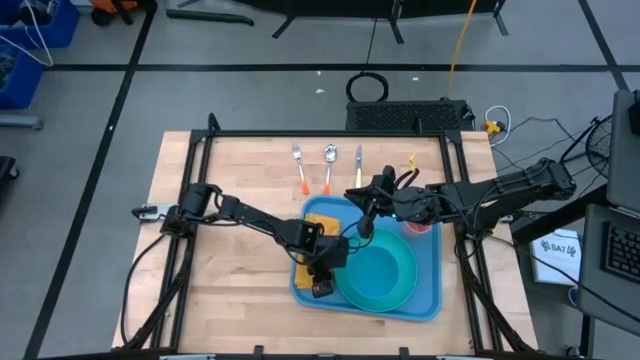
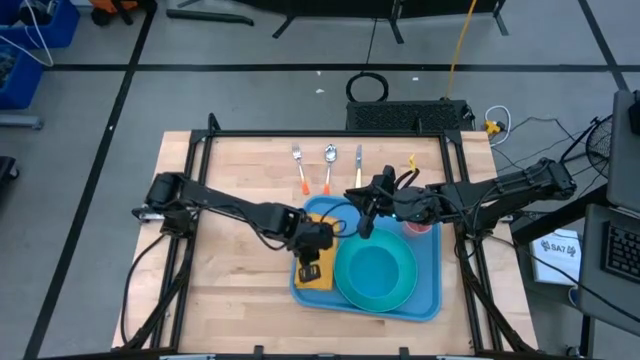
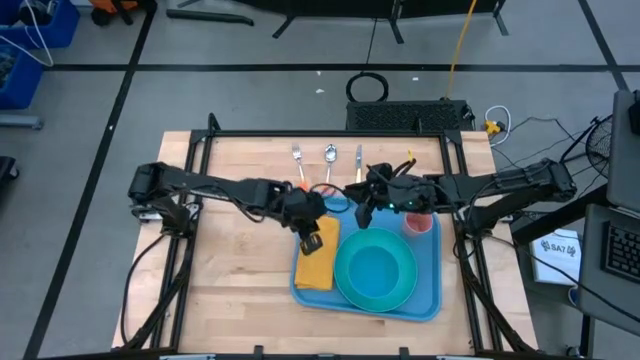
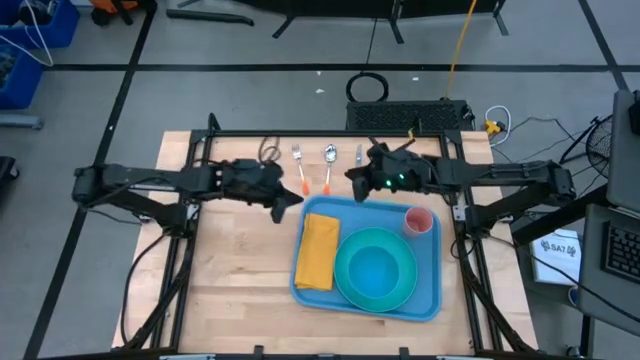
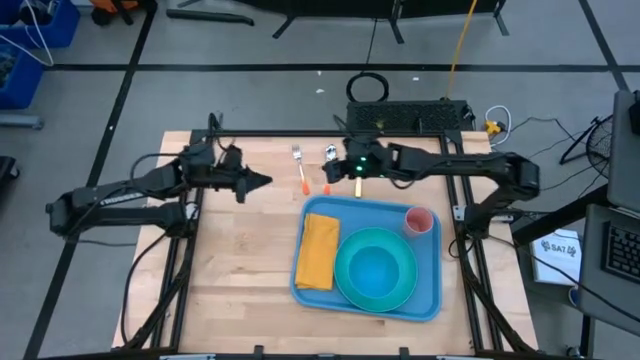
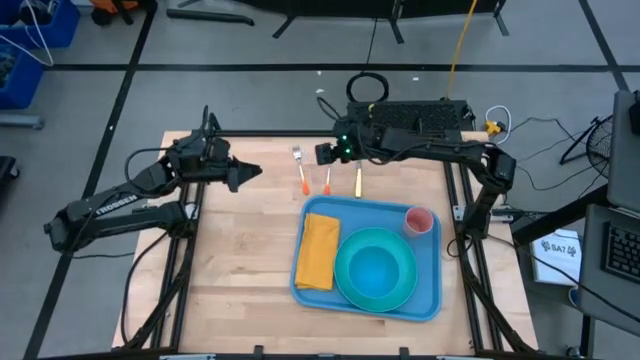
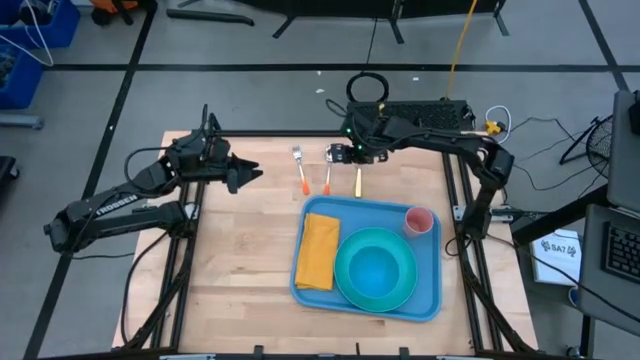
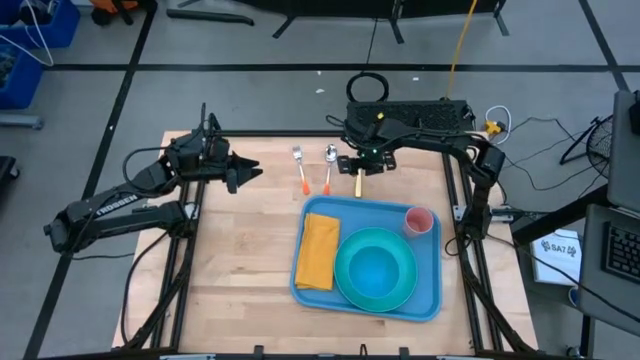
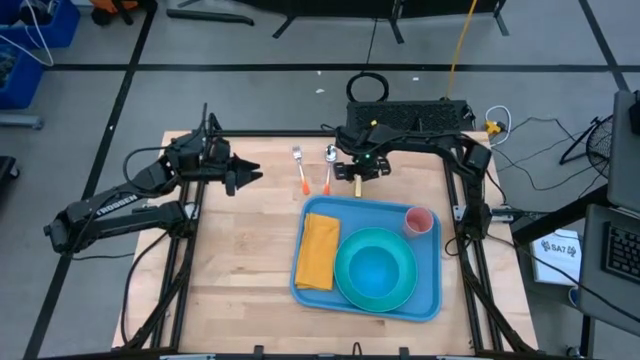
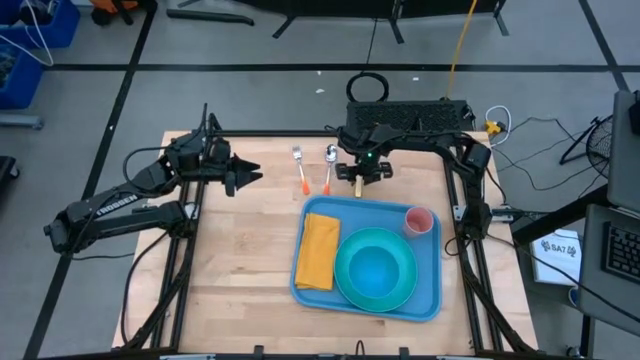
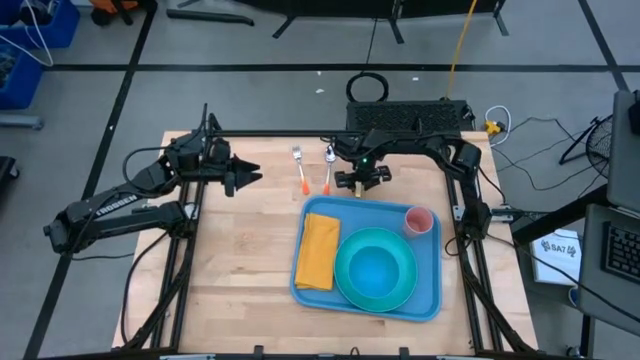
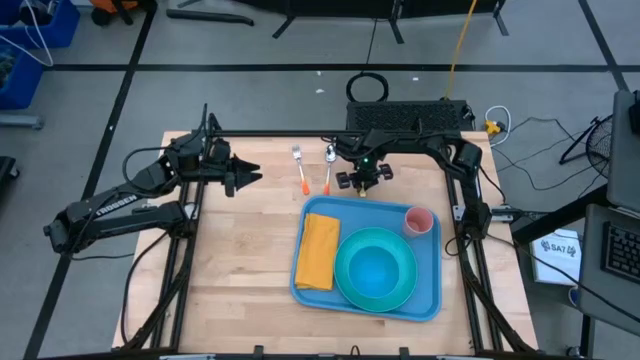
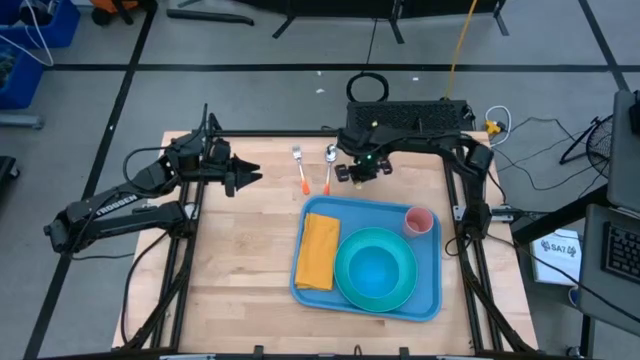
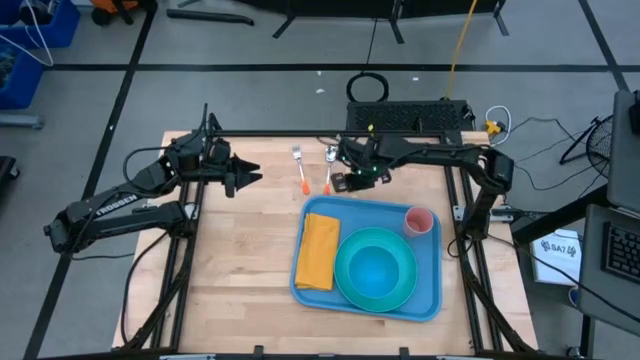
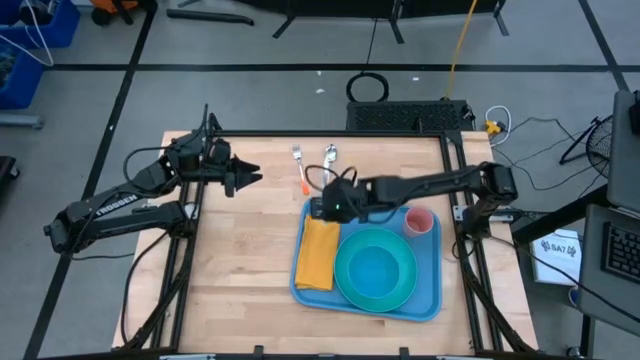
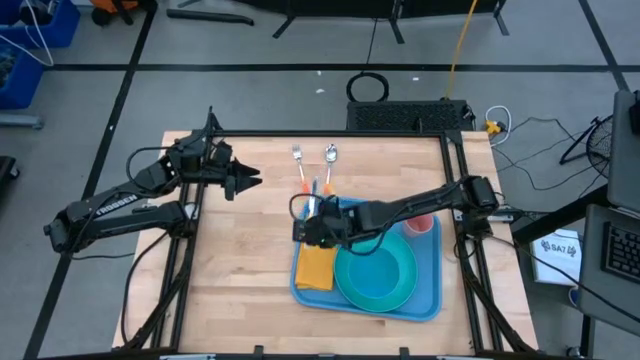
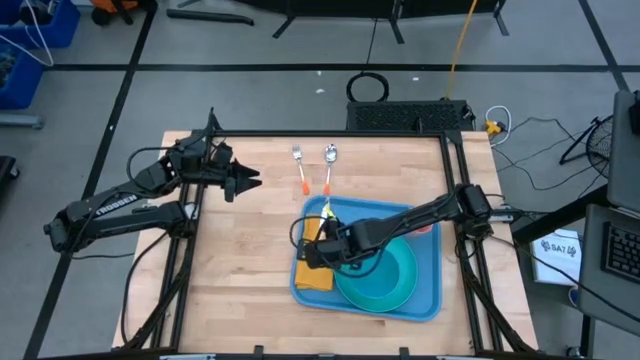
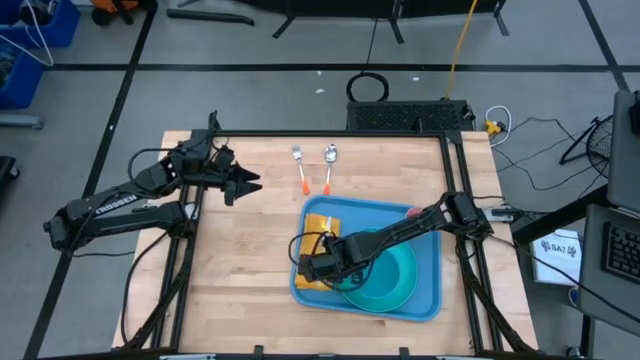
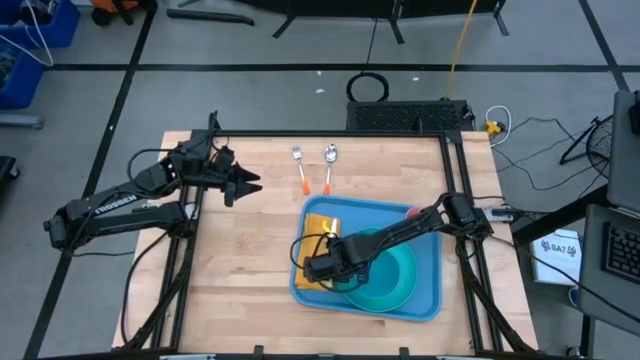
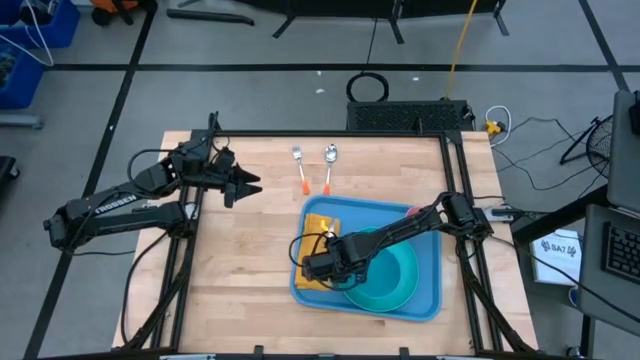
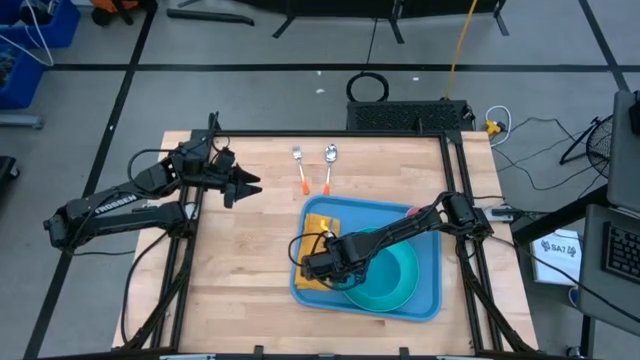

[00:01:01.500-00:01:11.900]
Task: Set up tray
Put the yellow knife on top of the yellow napkin

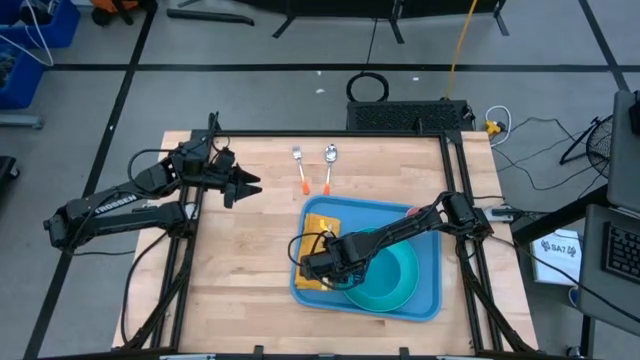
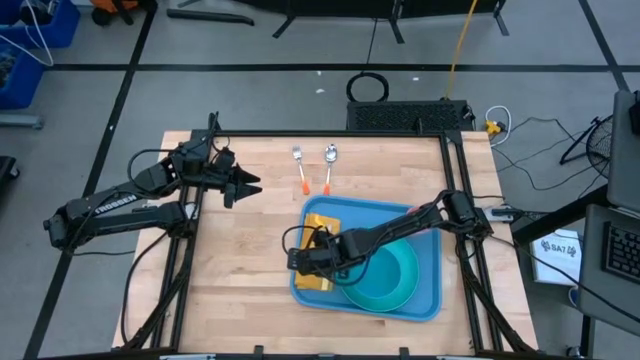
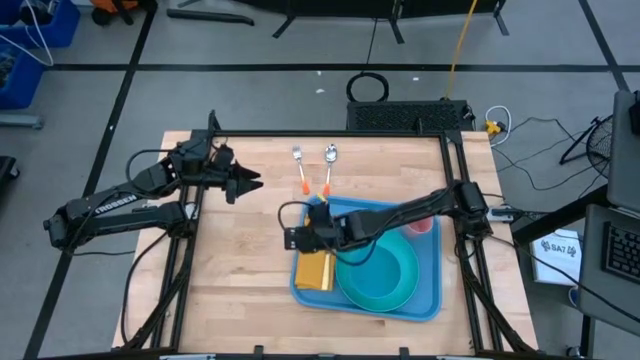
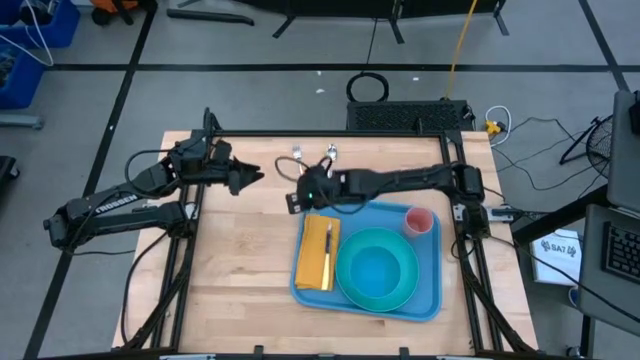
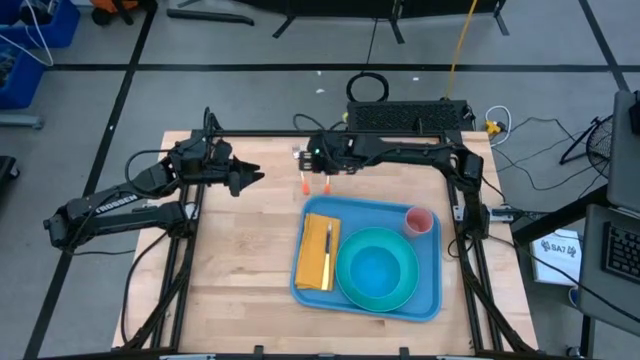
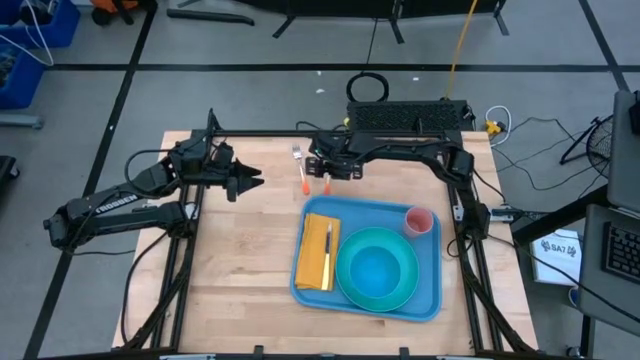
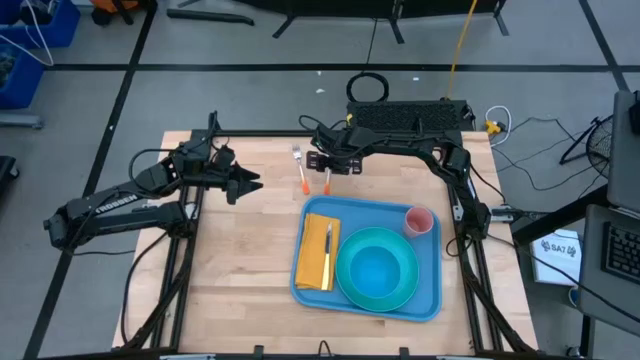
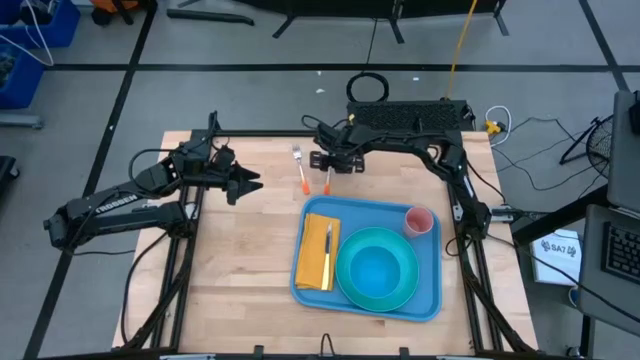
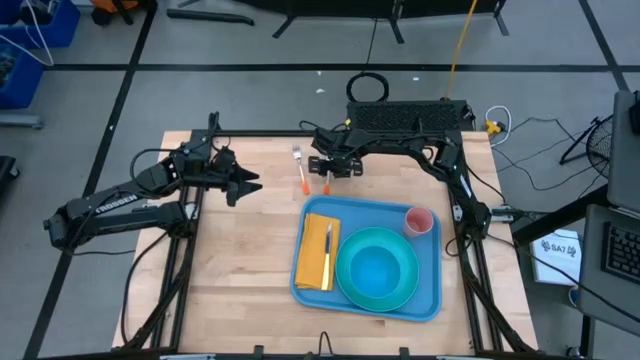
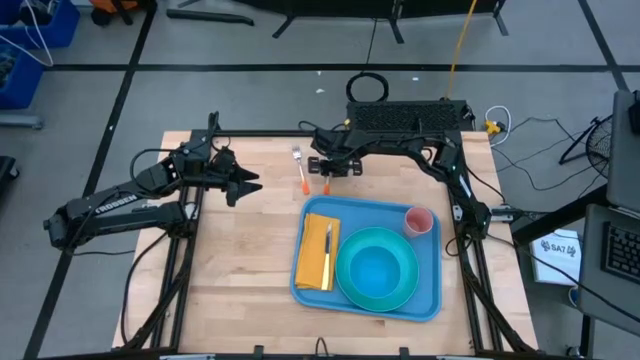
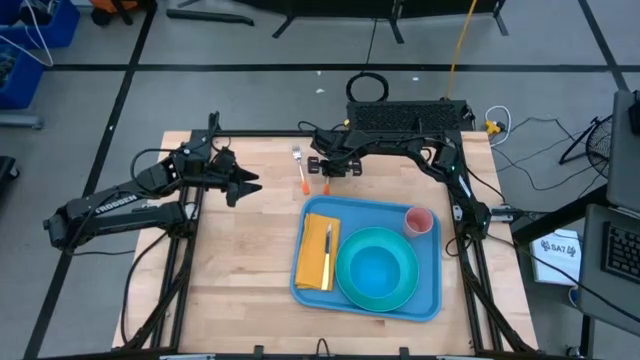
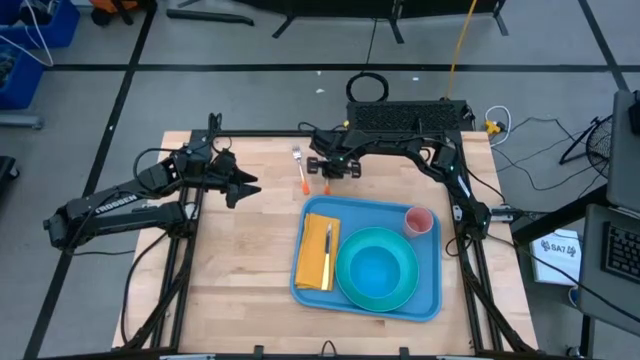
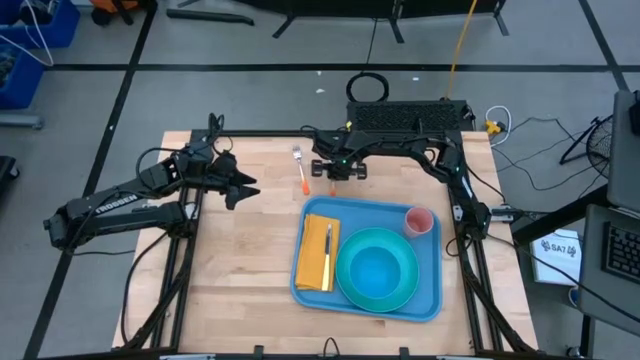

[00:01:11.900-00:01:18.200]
Put the orange spoon on top of the yellow napkin

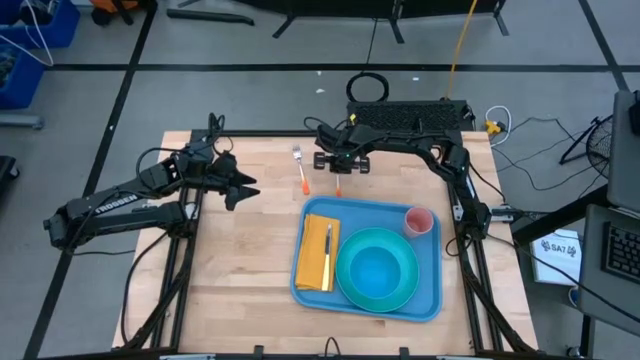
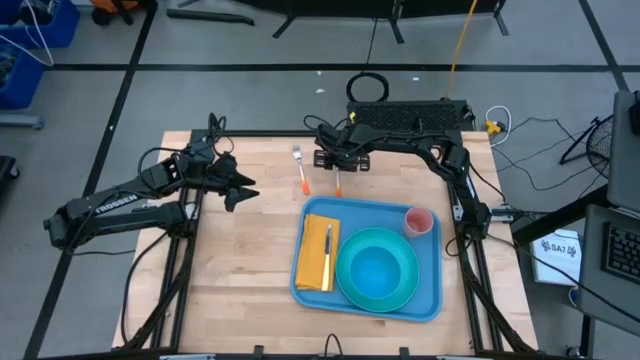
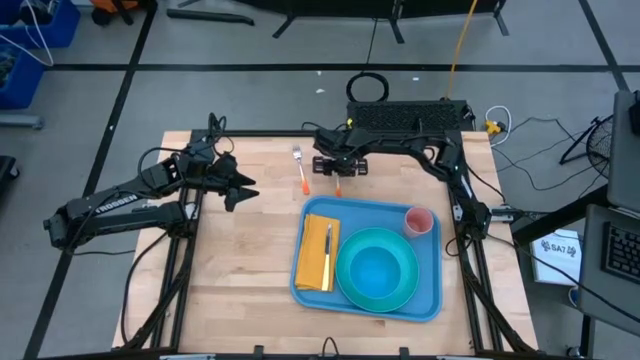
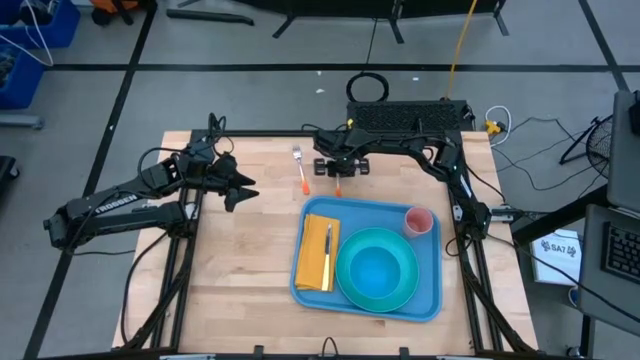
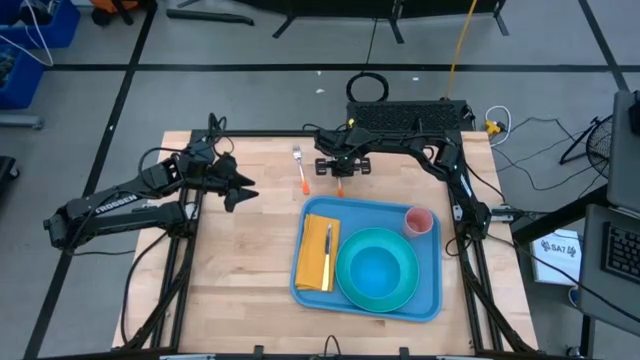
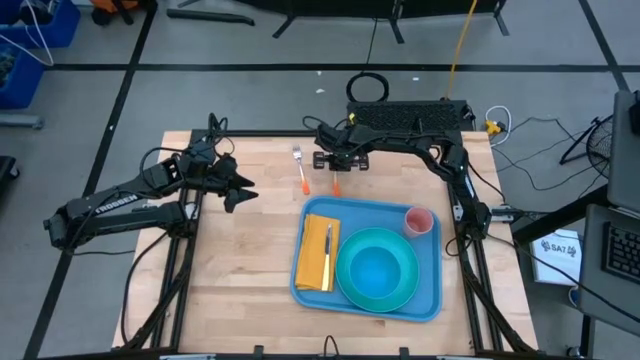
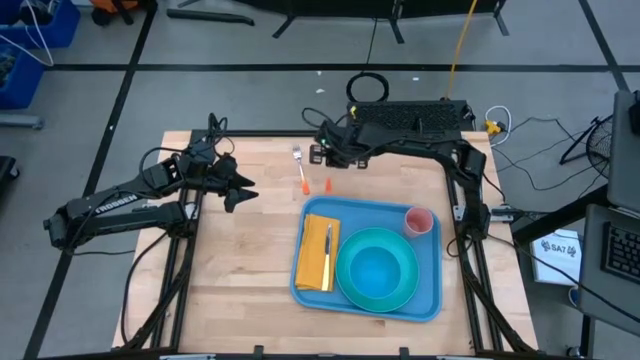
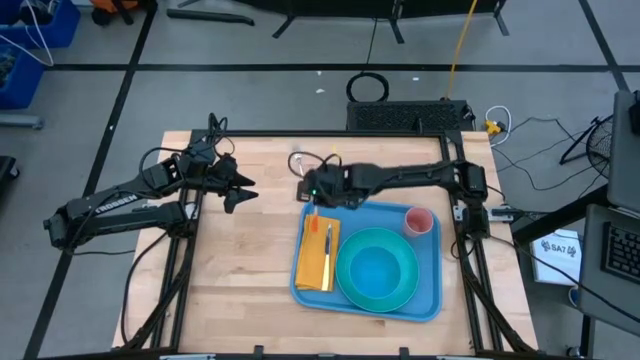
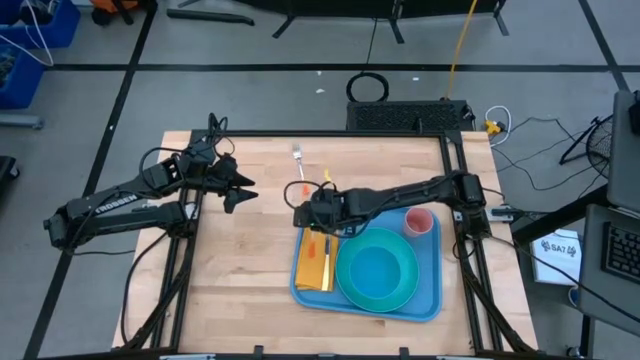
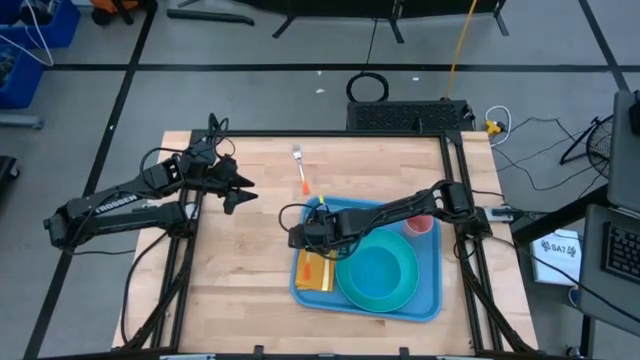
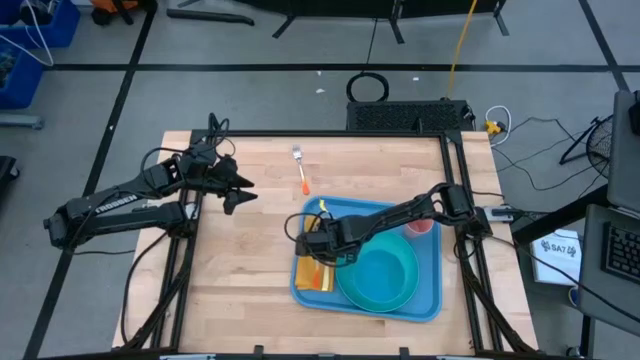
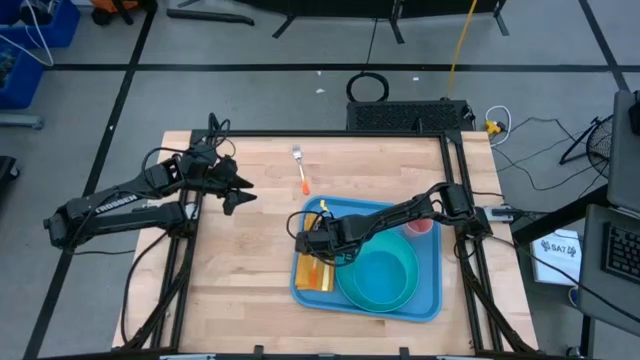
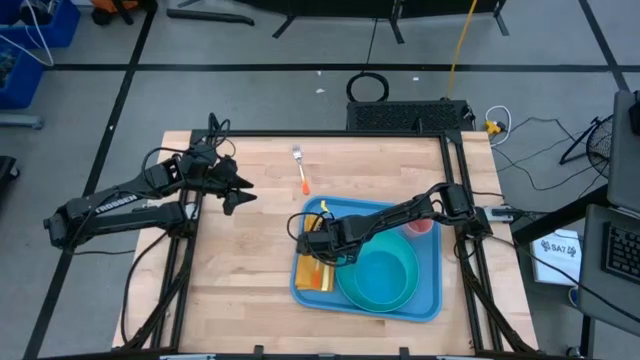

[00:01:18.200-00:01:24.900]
Put the orange spoon on top of the yellow napkin
